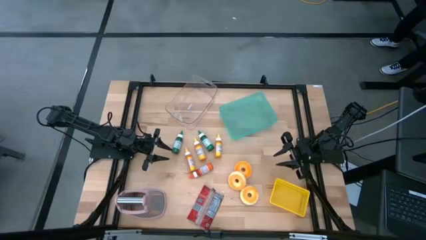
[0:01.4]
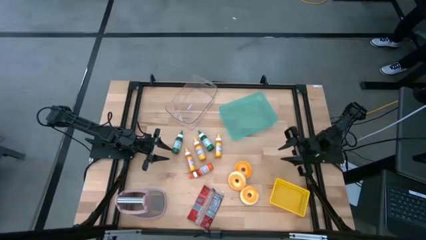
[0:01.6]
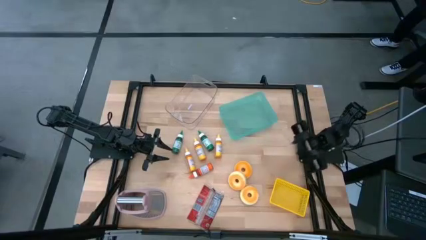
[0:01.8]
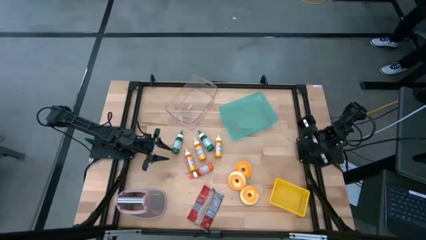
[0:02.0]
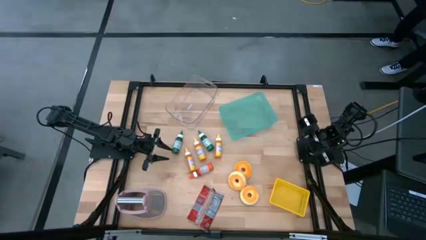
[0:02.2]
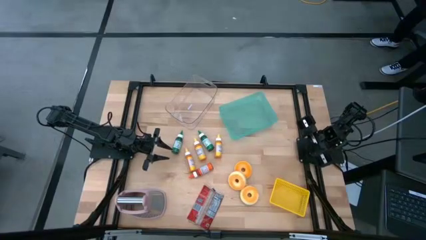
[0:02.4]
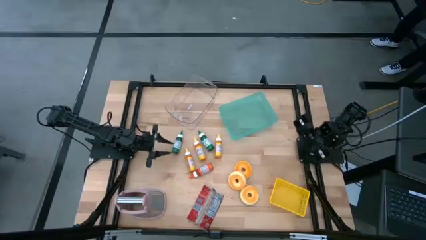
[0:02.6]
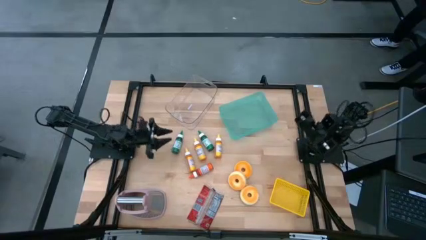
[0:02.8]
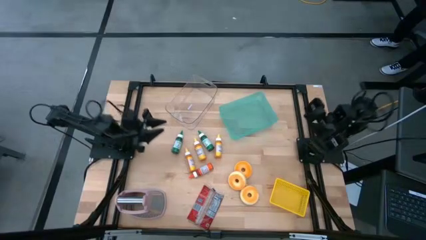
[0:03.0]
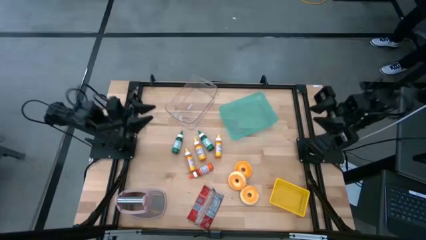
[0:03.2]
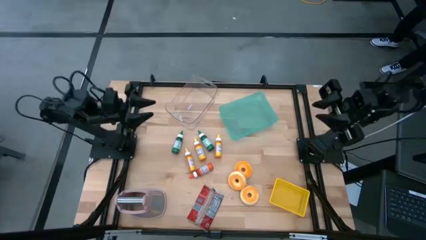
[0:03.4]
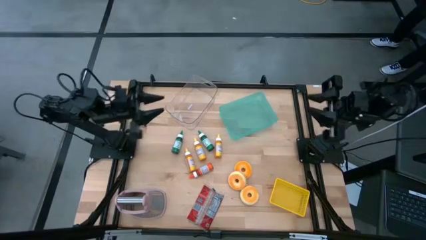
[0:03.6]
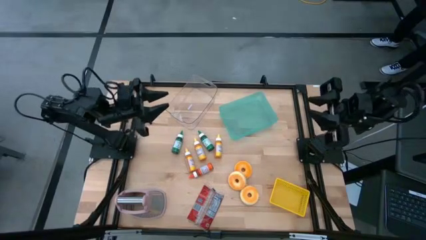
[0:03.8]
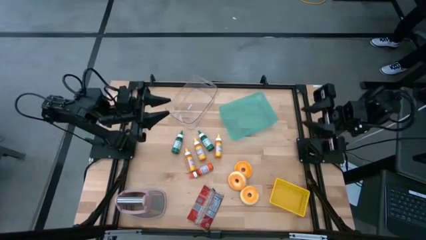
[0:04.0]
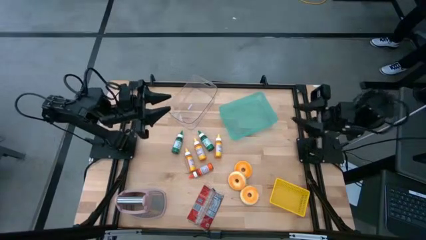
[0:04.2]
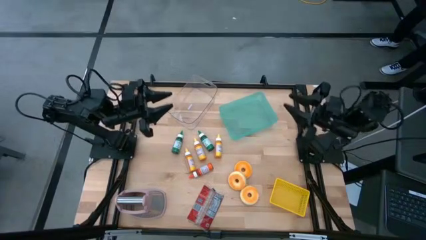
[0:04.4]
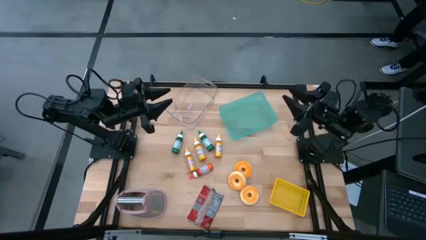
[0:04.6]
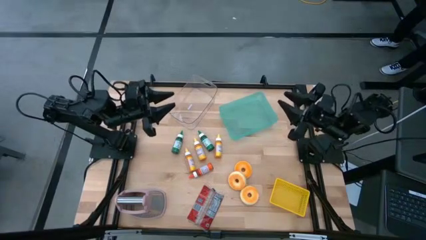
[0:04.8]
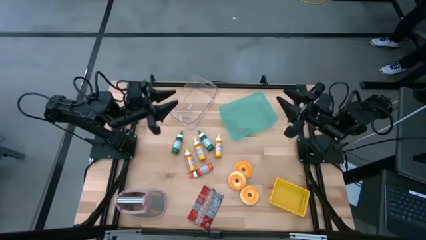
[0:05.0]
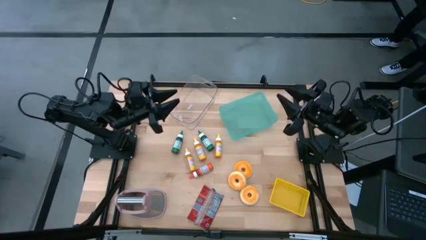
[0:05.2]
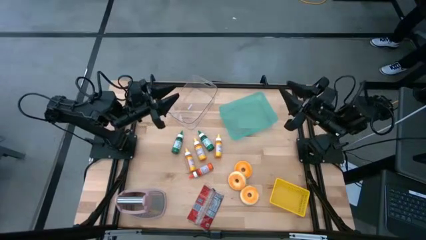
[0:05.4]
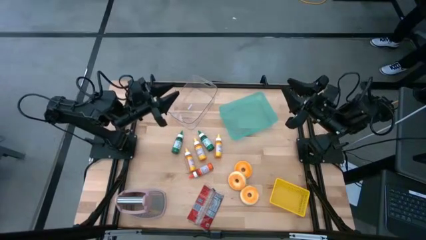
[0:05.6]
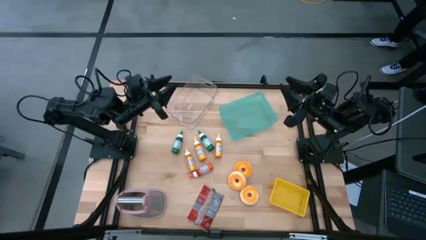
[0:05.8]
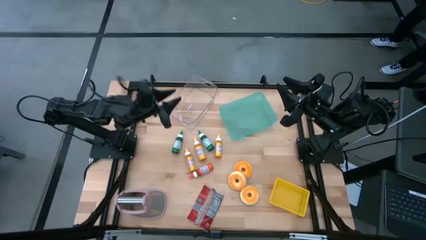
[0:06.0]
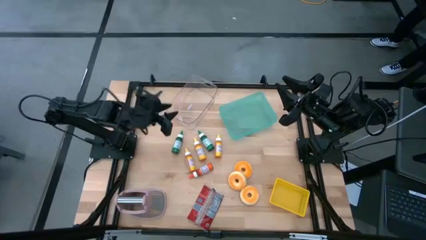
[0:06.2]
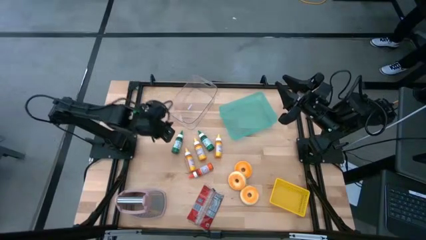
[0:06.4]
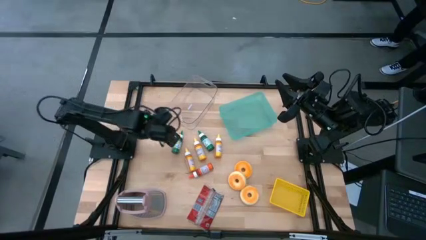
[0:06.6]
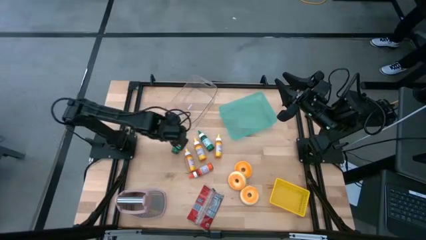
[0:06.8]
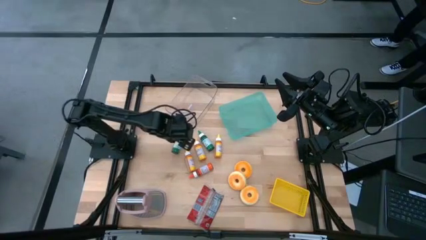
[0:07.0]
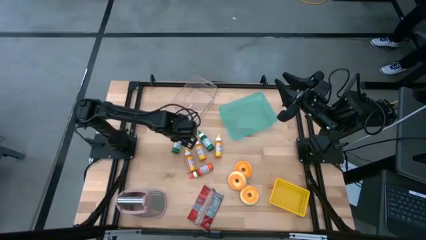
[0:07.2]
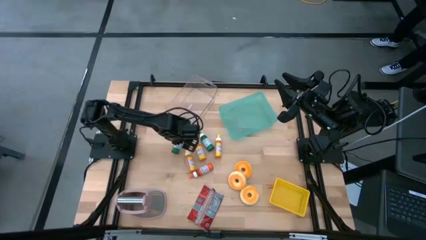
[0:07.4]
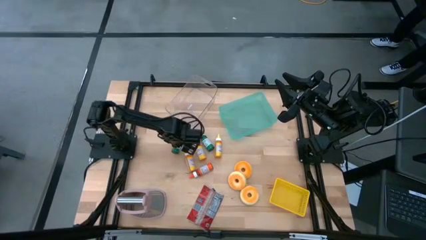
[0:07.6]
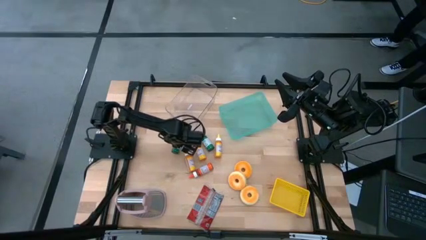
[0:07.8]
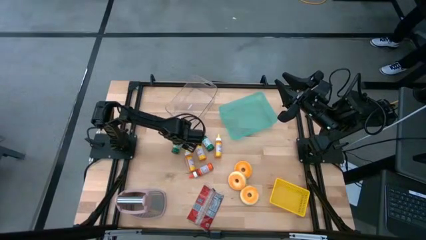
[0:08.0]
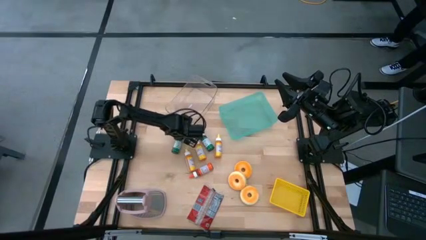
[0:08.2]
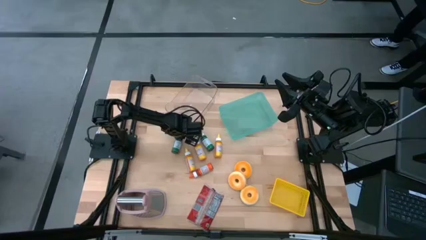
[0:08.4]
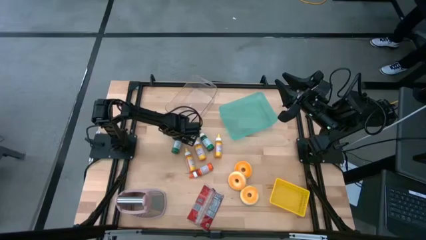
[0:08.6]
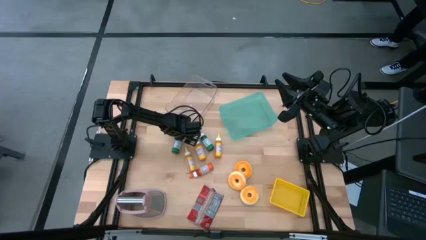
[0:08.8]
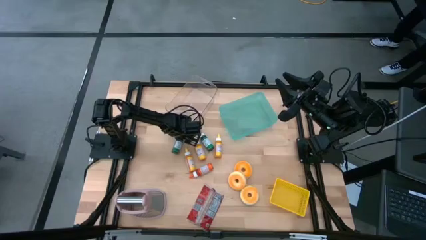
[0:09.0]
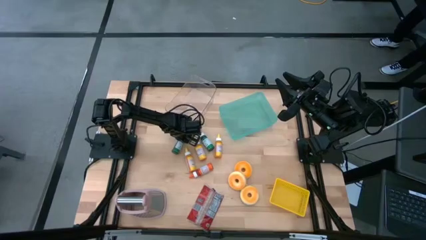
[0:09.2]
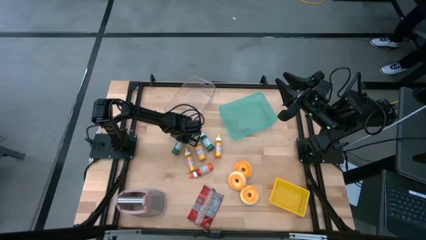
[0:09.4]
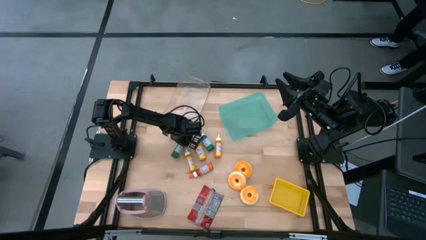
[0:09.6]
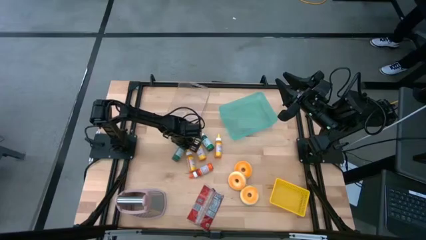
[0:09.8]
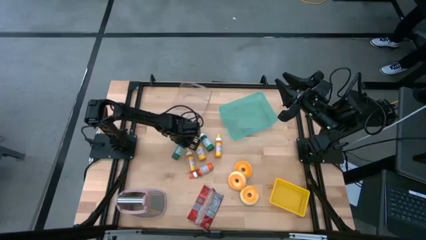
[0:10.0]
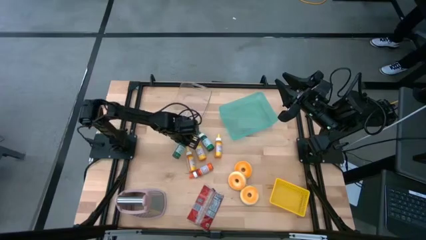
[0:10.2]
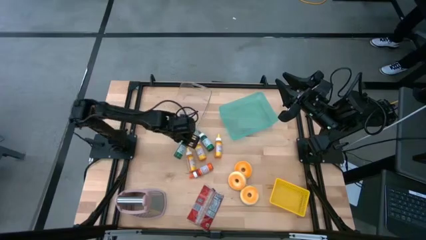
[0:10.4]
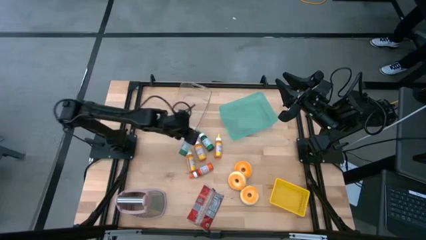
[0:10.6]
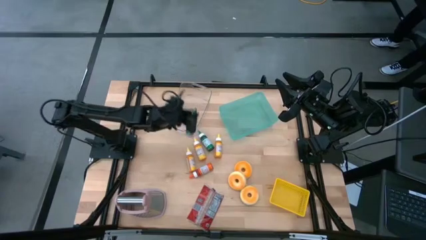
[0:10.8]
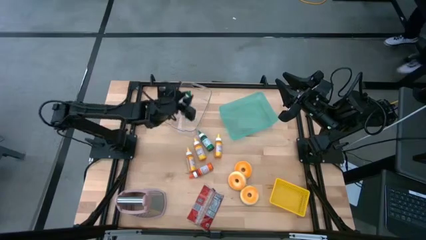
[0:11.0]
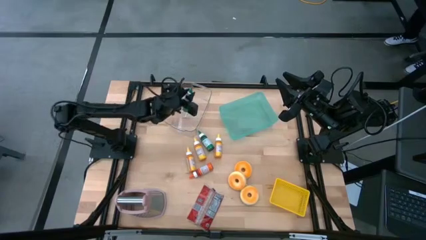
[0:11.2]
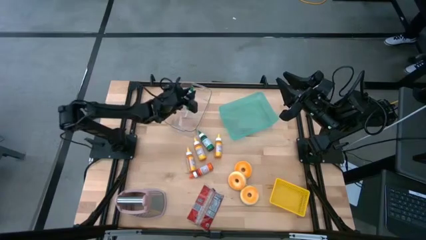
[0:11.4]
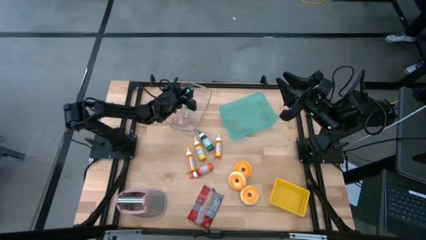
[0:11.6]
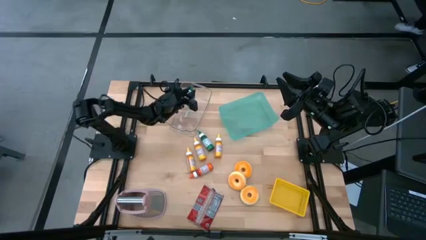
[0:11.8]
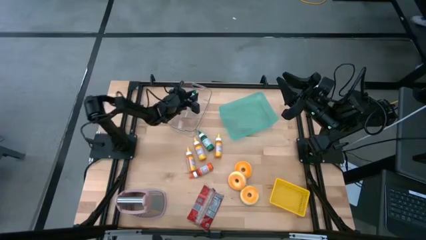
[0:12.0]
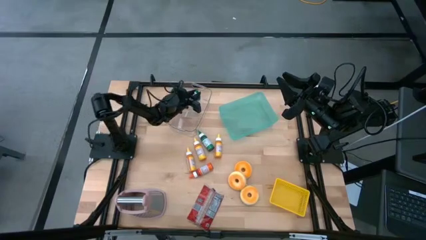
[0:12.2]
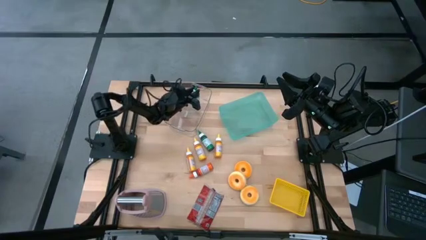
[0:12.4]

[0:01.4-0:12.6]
Put the left green food coloring bottle into the transparent bin
